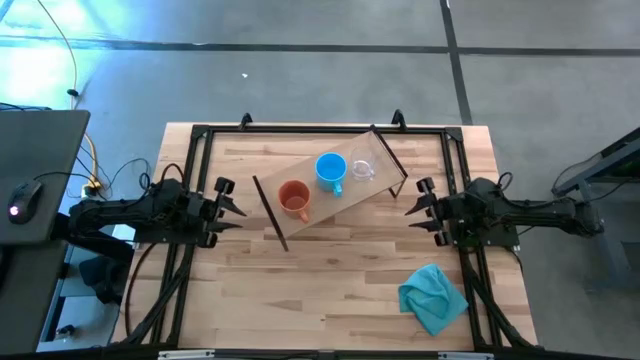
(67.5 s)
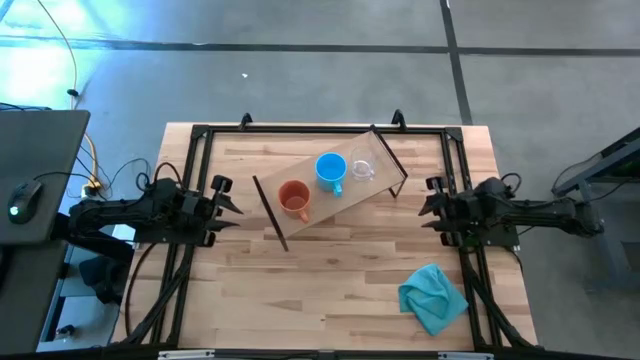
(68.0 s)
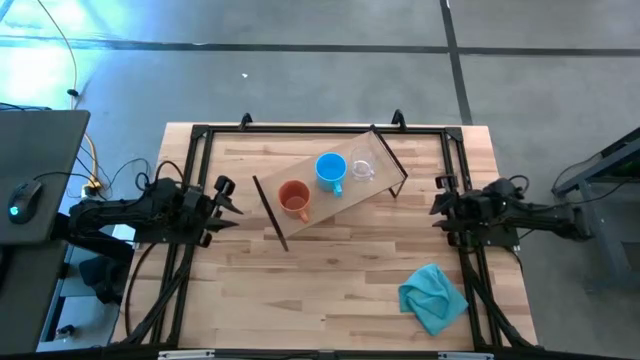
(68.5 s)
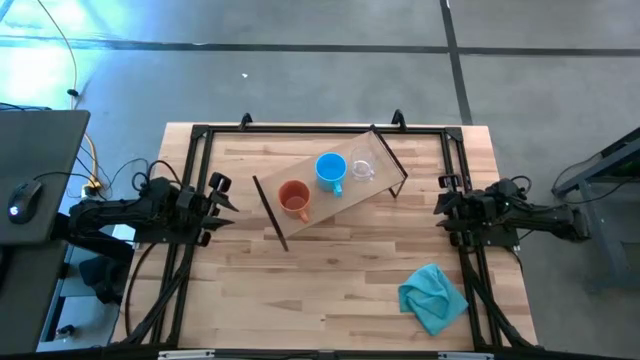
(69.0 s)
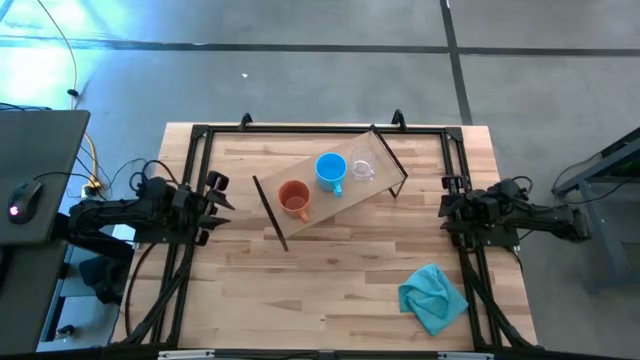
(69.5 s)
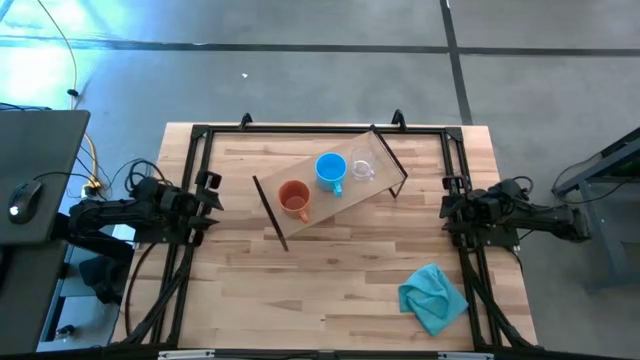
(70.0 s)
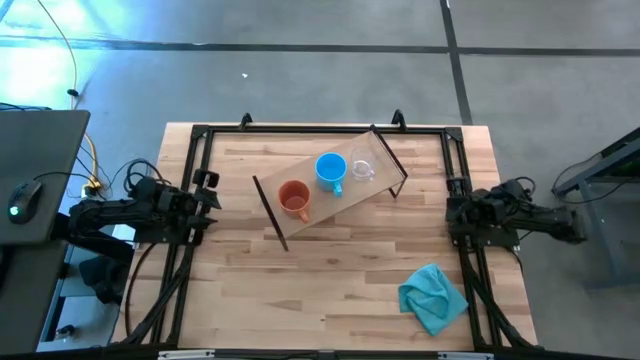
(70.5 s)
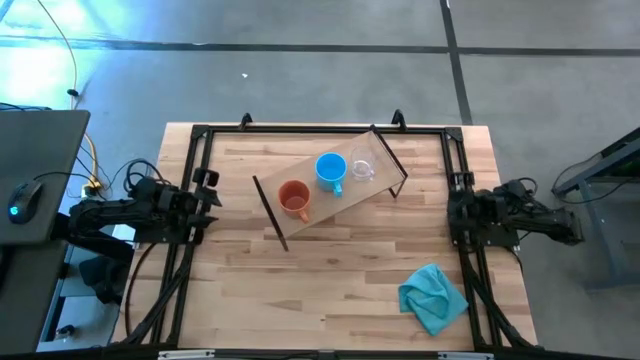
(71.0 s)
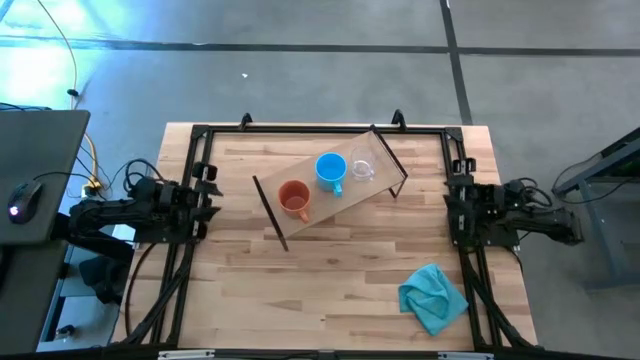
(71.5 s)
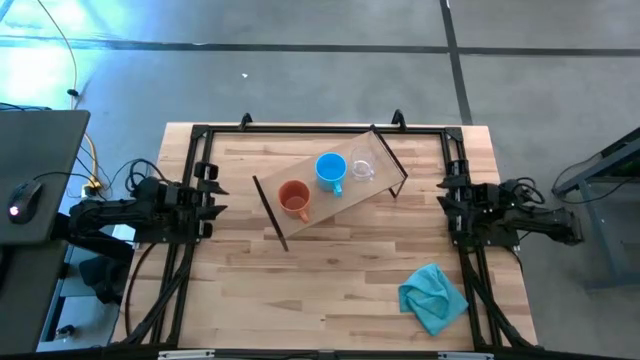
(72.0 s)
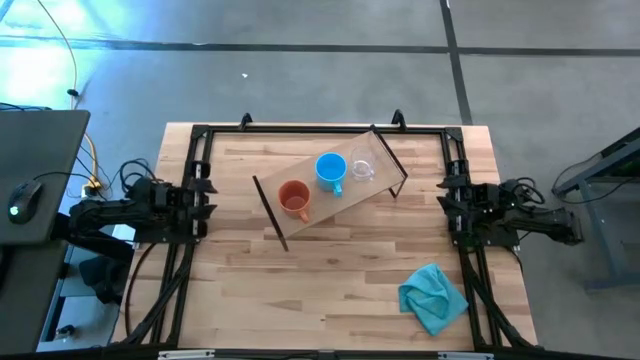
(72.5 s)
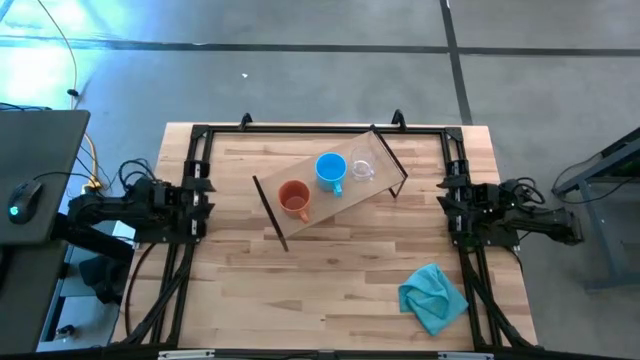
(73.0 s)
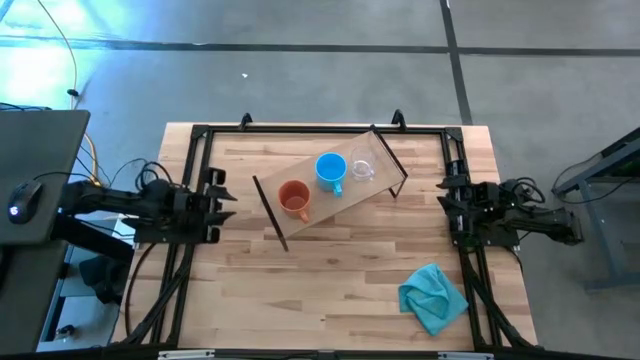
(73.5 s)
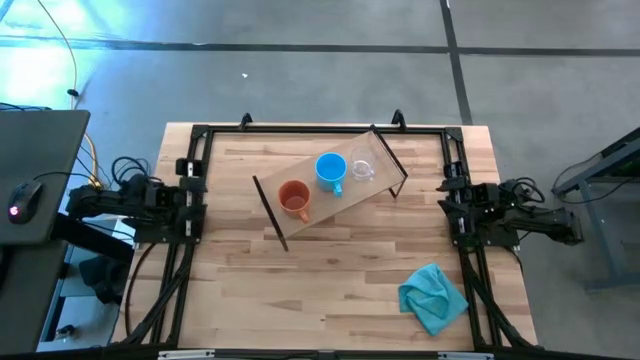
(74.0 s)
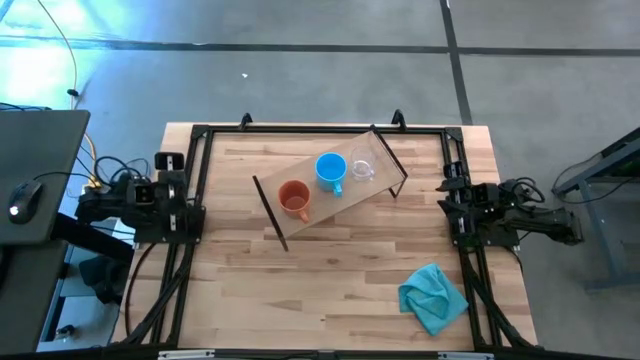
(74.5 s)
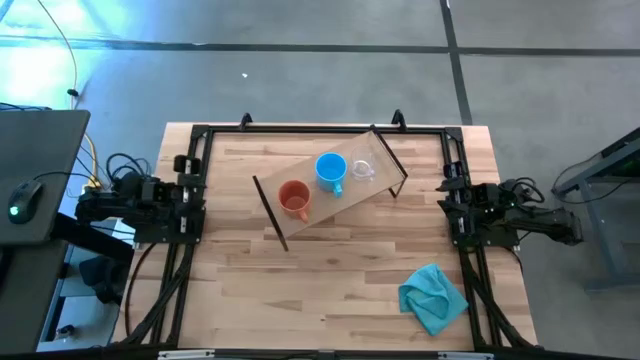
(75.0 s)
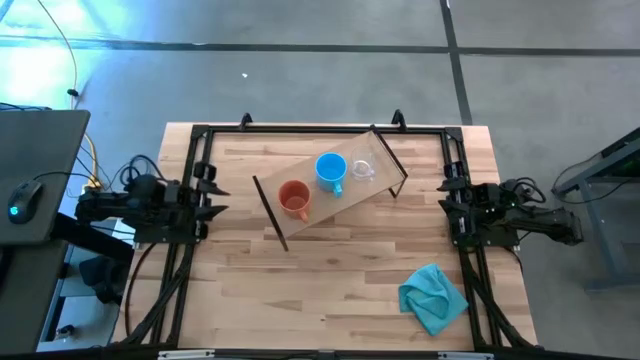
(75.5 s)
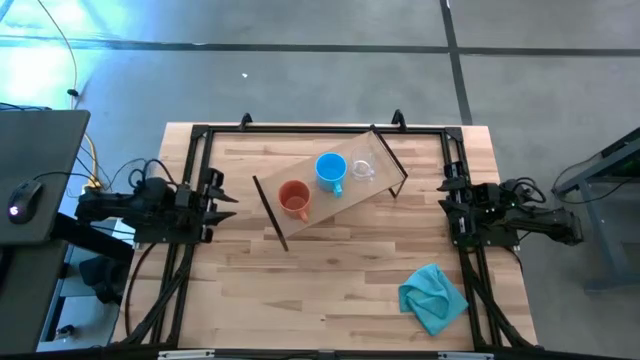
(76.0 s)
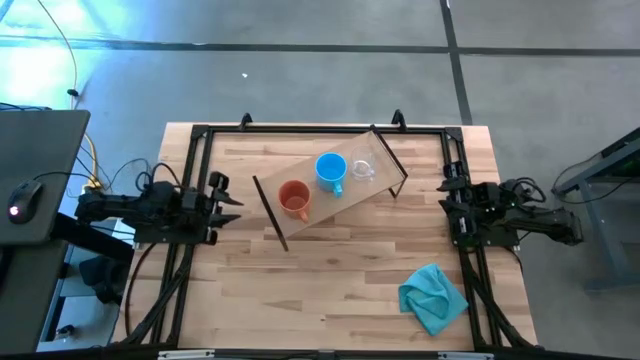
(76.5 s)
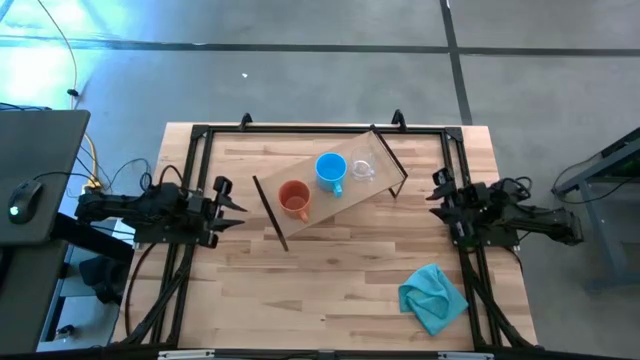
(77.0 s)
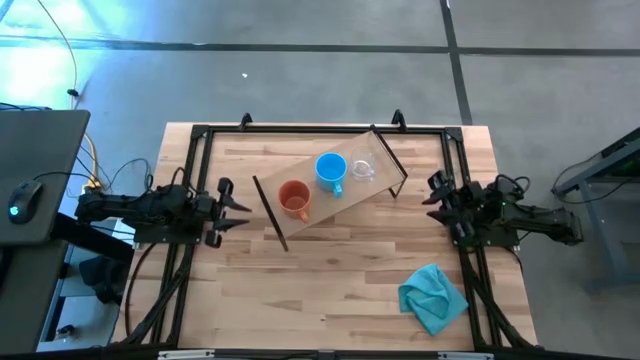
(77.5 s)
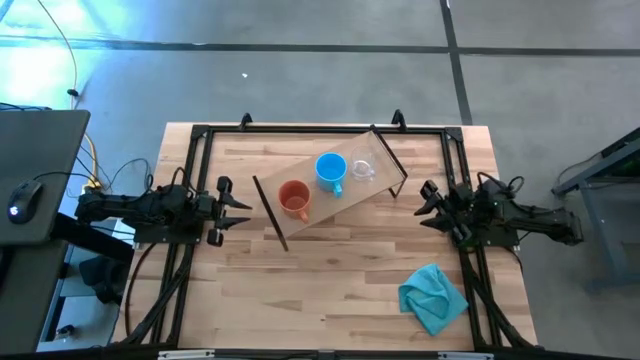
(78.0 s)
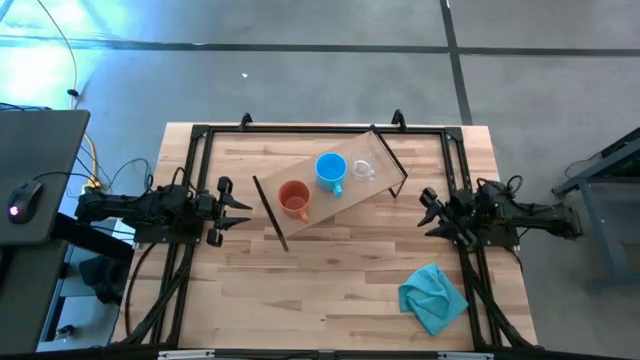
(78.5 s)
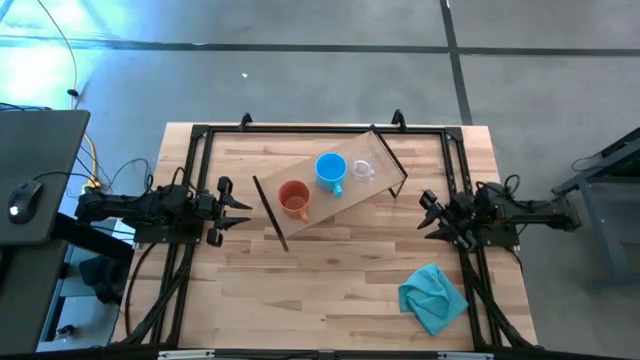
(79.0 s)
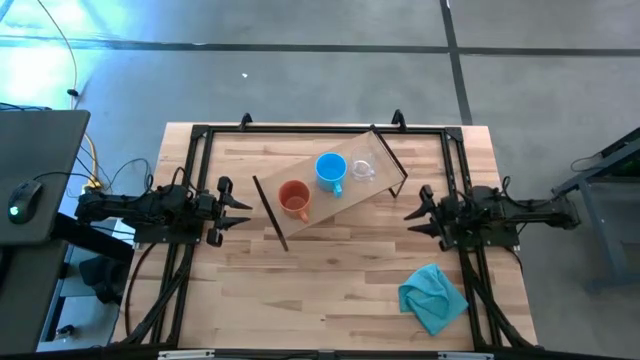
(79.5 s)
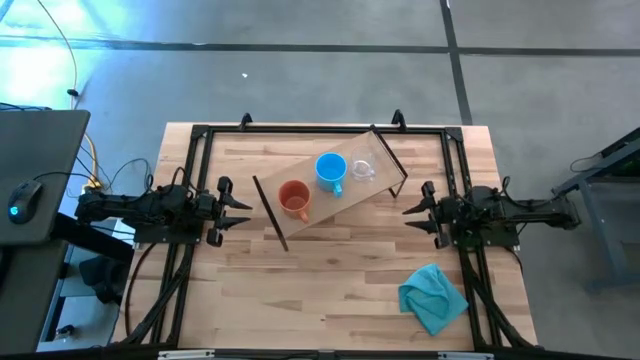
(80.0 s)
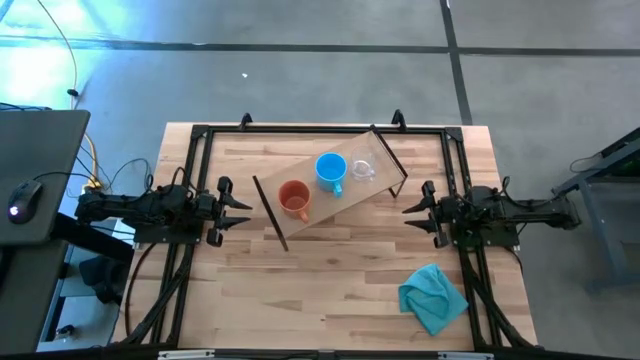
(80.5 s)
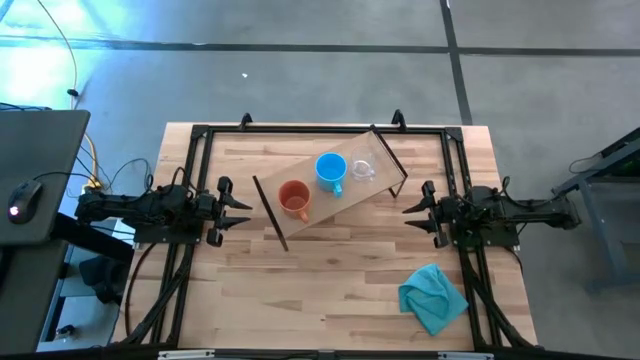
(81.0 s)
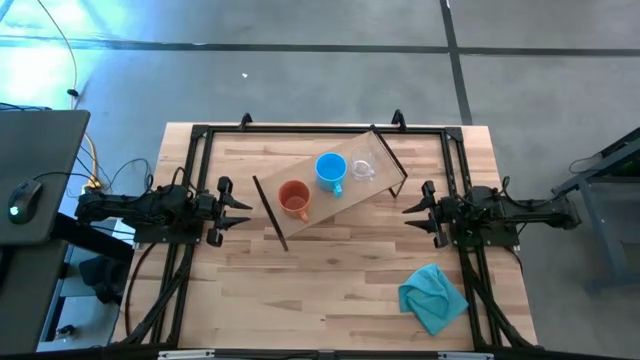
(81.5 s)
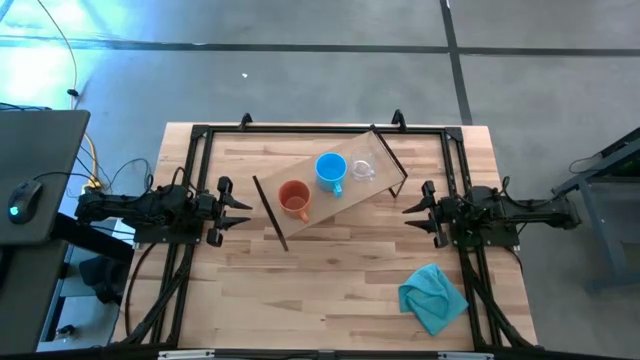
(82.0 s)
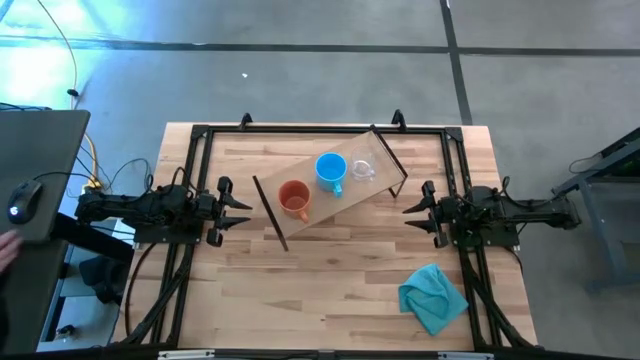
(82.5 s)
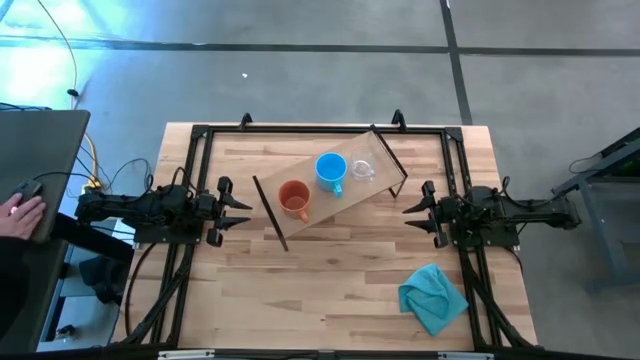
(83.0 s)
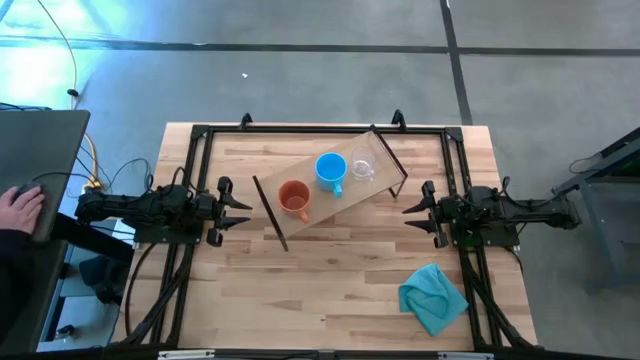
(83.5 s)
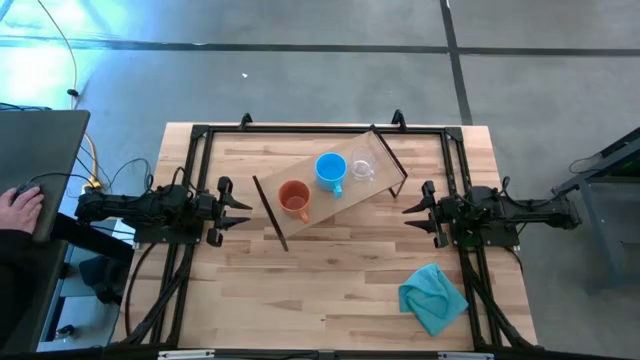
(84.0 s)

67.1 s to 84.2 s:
Task: Stack small to large cups/mugs on shelf
Return to Home Position

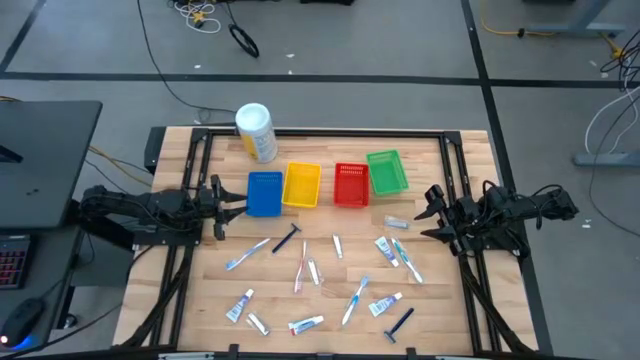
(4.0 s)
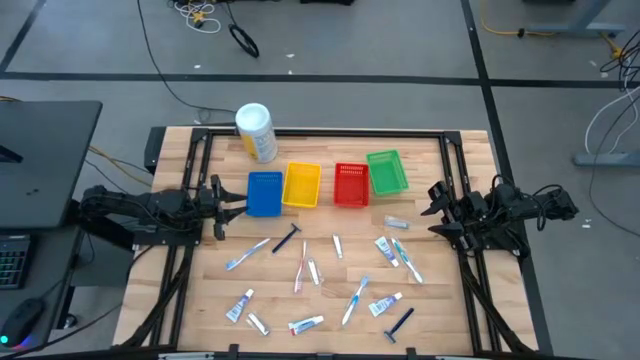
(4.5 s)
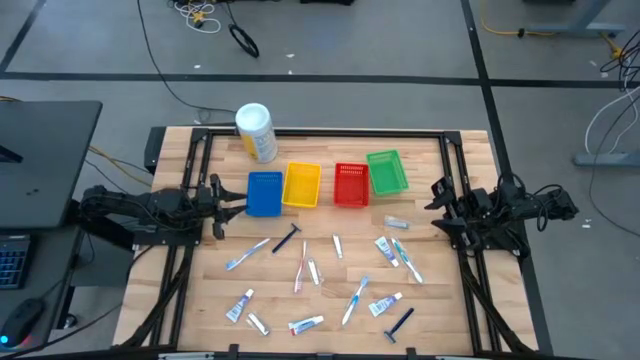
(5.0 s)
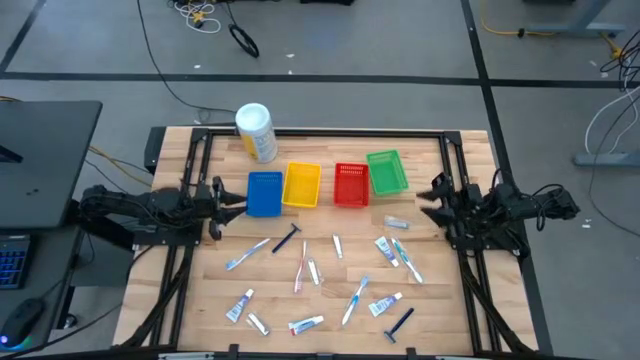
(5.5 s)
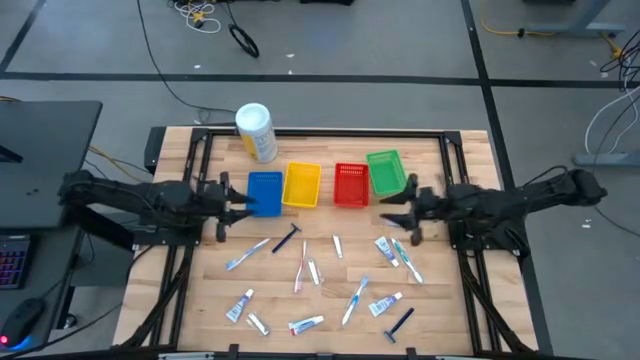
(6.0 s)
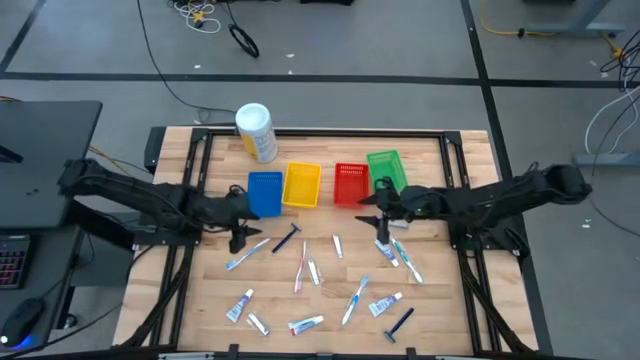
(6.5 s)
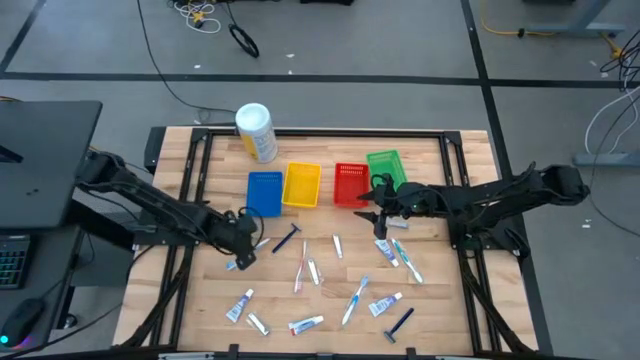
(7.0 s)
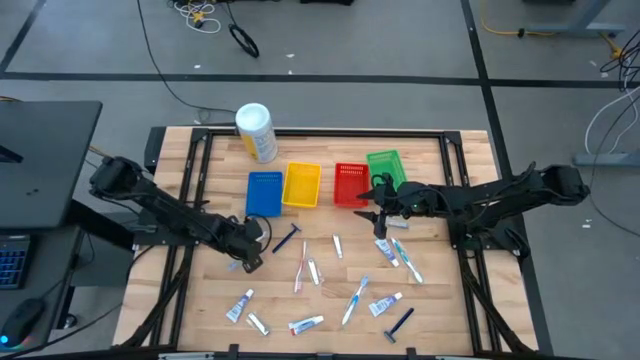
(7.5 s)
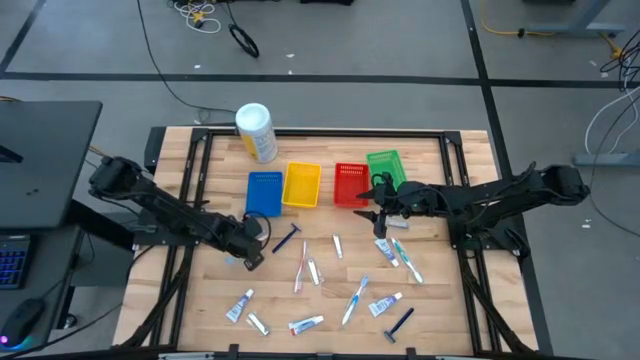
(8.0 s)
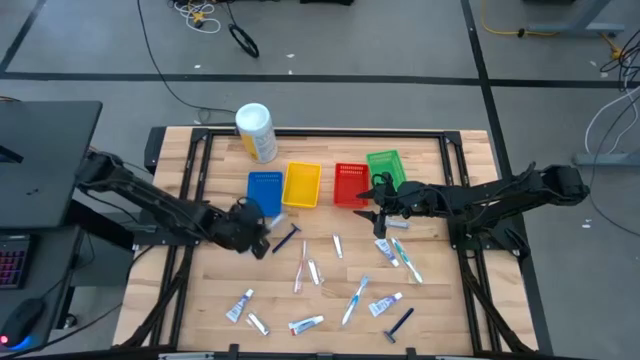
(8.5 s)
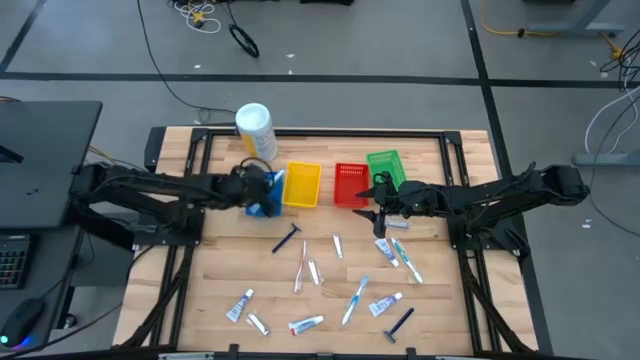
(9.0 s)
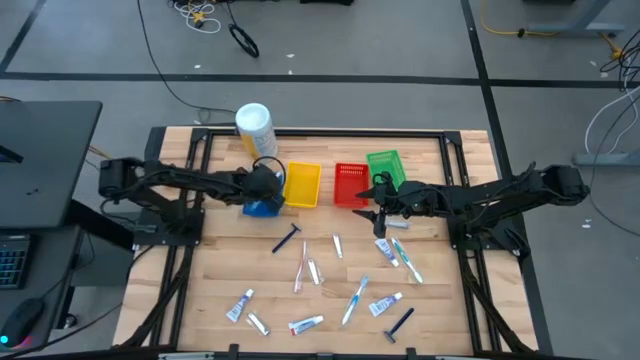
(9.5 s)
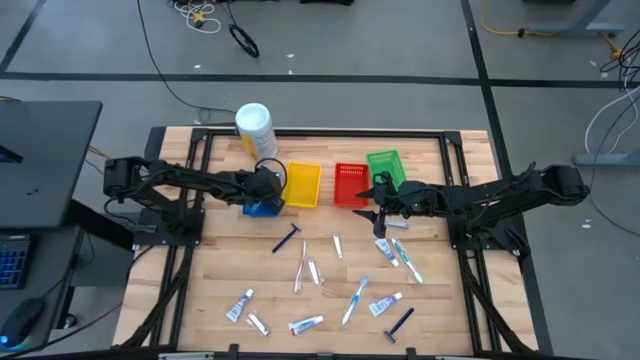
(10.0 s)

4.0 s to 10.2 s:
Task: Pick & Place Travel size toiletries
Put the blue toothbrush into the blue bin
